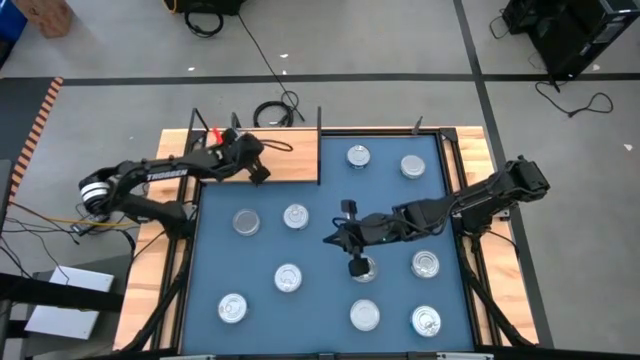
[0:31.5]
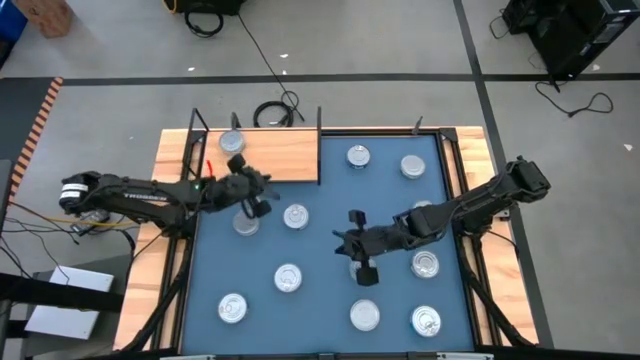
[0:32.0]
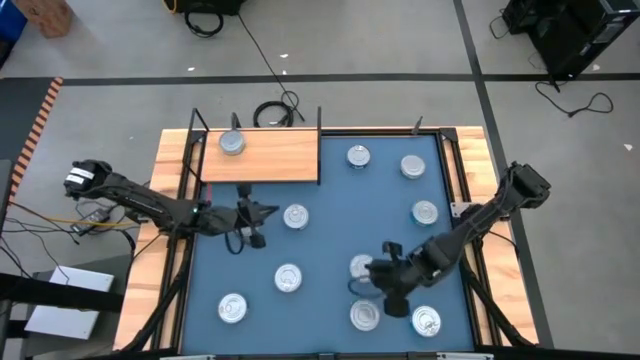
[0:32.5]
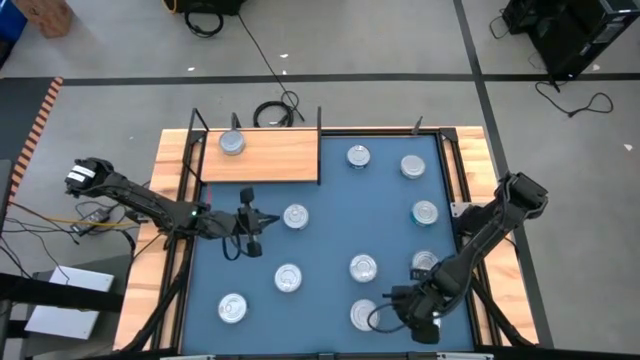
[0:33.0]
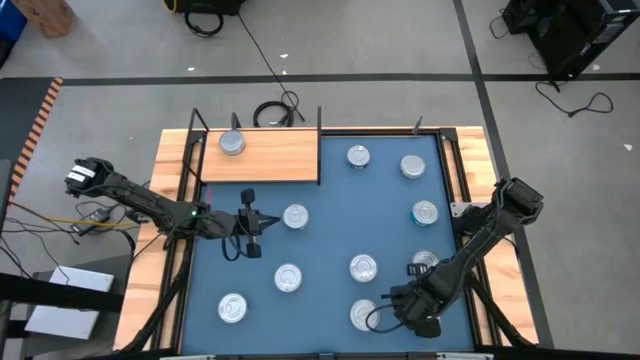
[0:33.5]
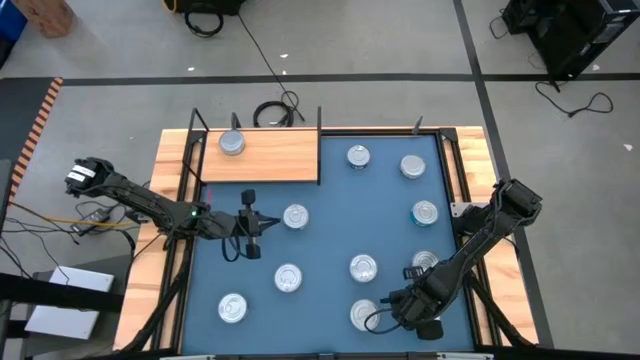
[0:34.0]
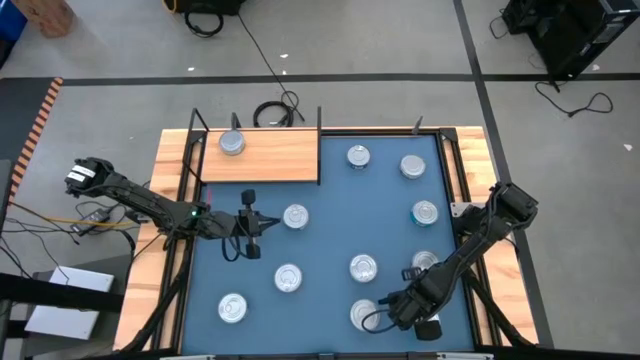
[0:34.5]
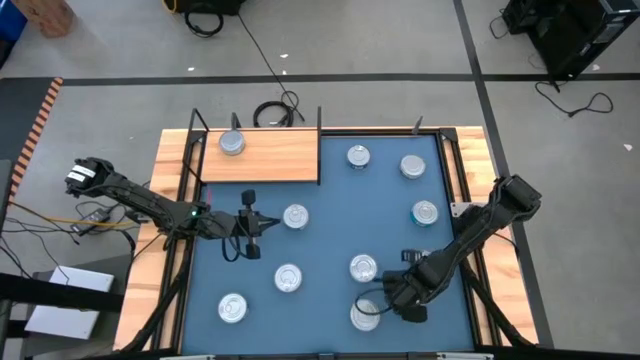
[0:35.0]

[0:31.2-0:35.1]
Task: Stack canned seafood by type on shelf
Put the yellow-blue tuna can on the shelf

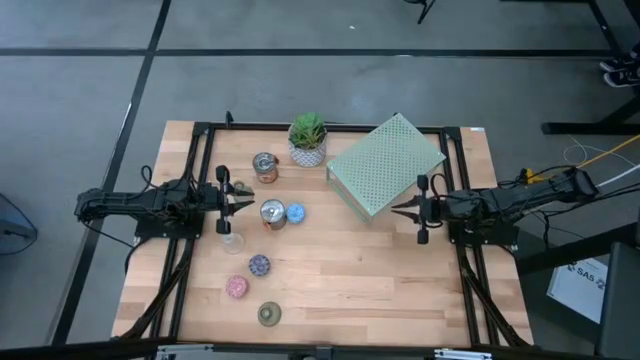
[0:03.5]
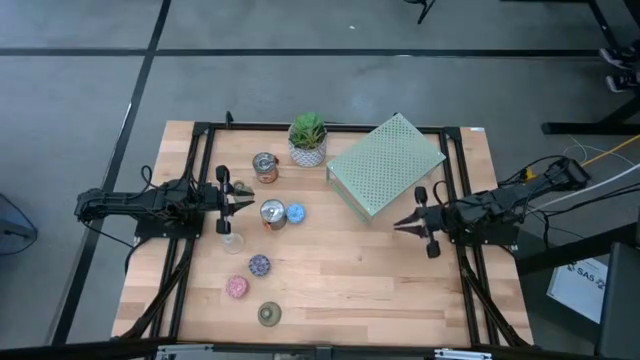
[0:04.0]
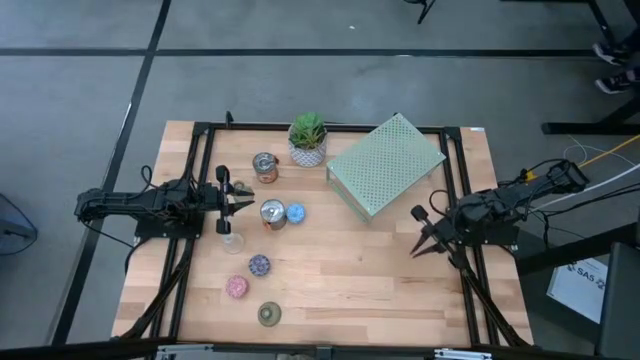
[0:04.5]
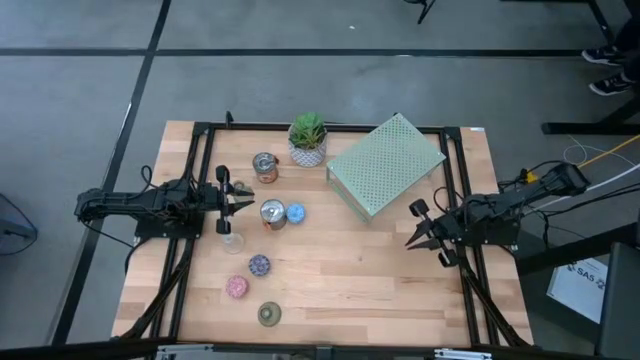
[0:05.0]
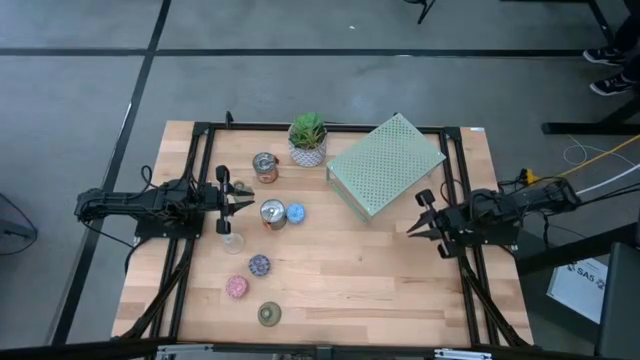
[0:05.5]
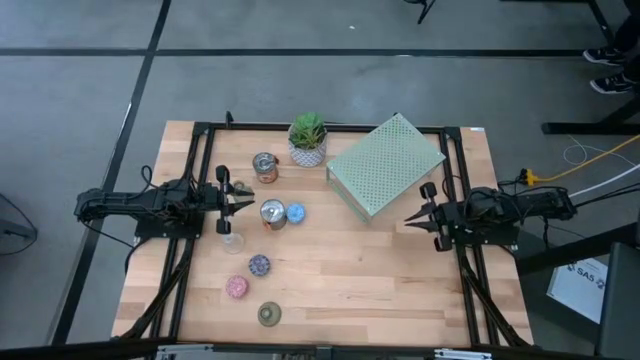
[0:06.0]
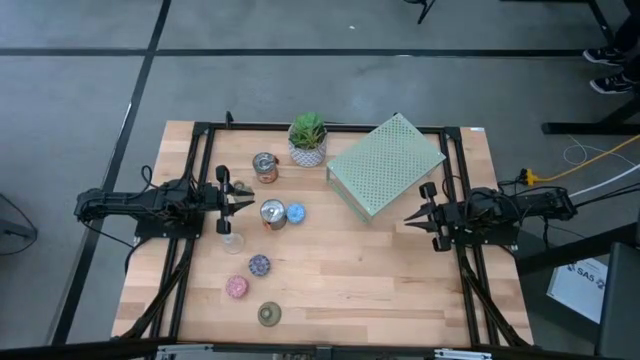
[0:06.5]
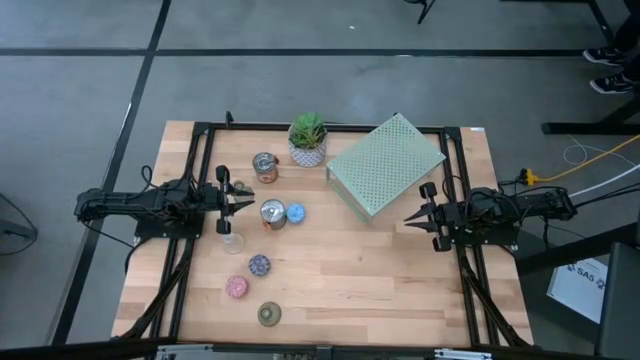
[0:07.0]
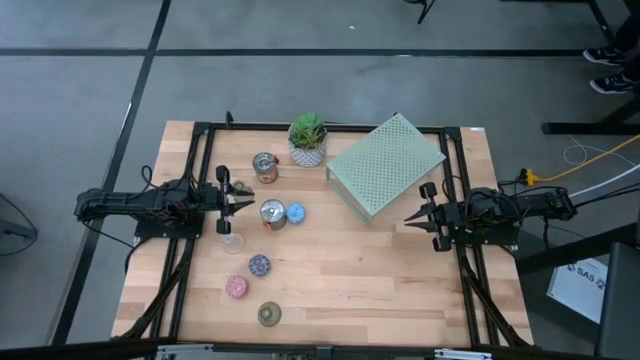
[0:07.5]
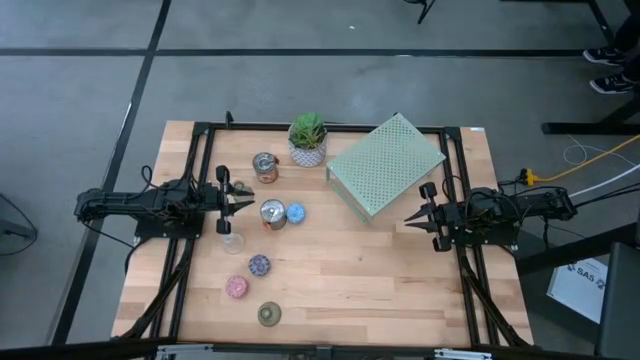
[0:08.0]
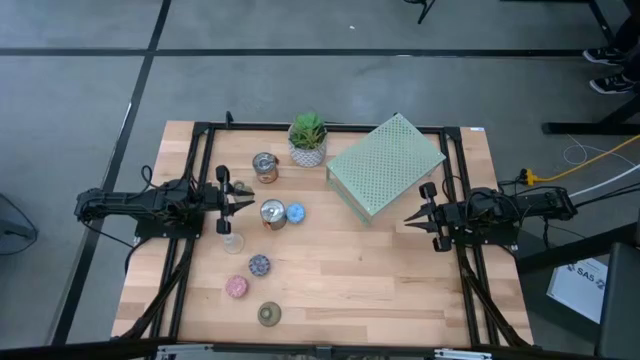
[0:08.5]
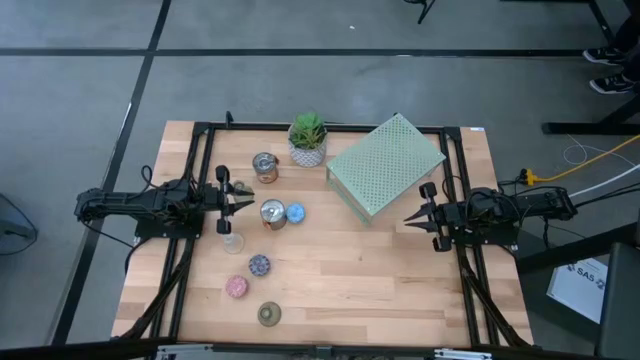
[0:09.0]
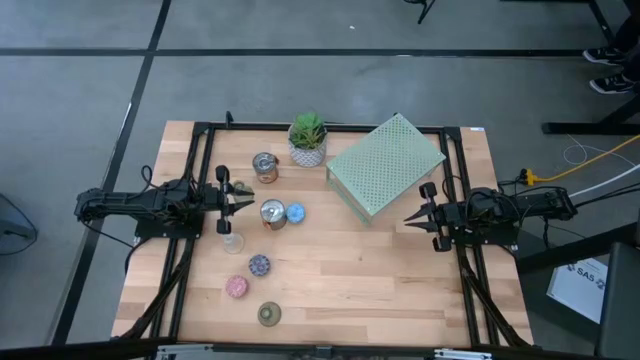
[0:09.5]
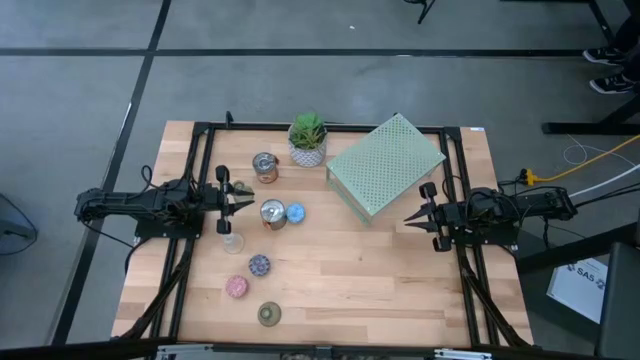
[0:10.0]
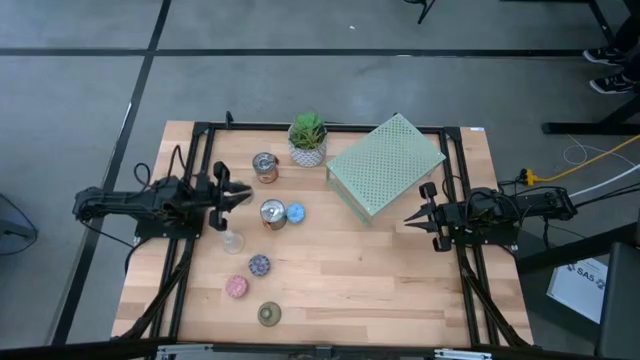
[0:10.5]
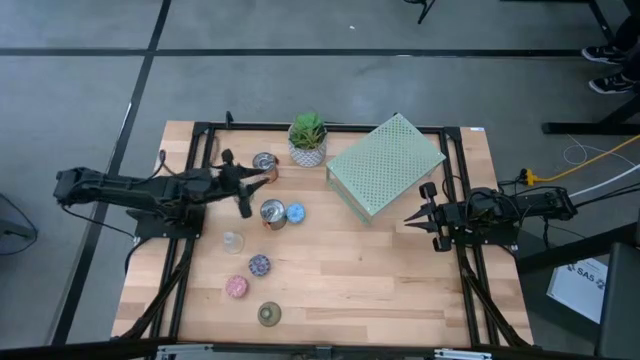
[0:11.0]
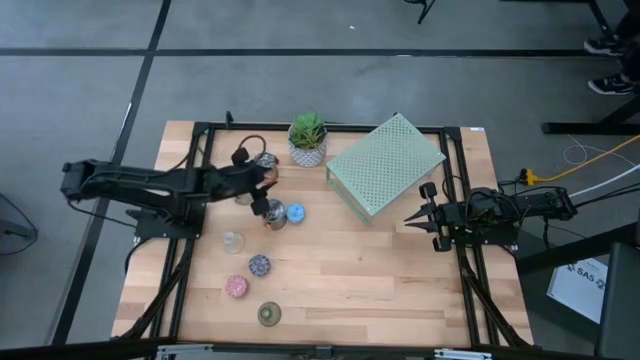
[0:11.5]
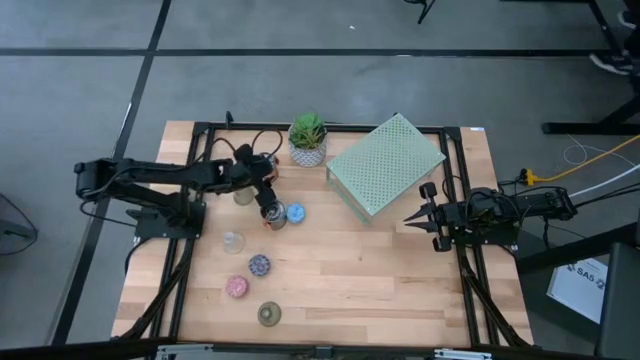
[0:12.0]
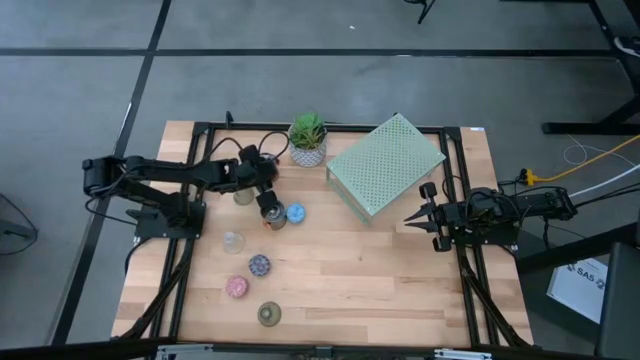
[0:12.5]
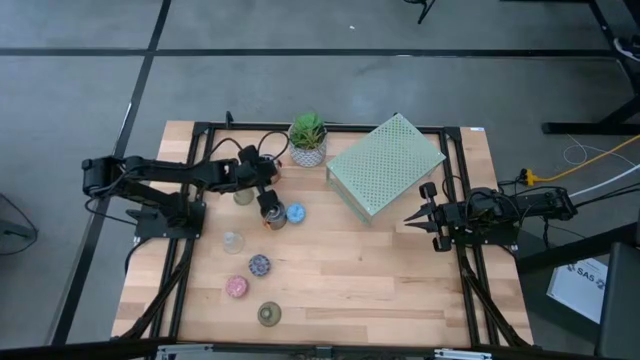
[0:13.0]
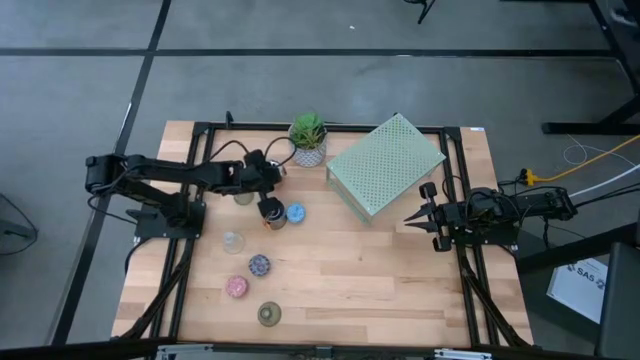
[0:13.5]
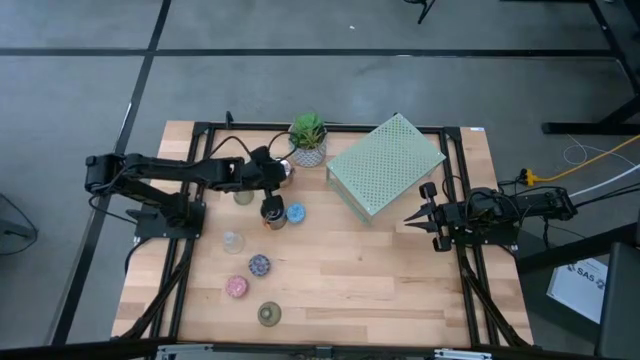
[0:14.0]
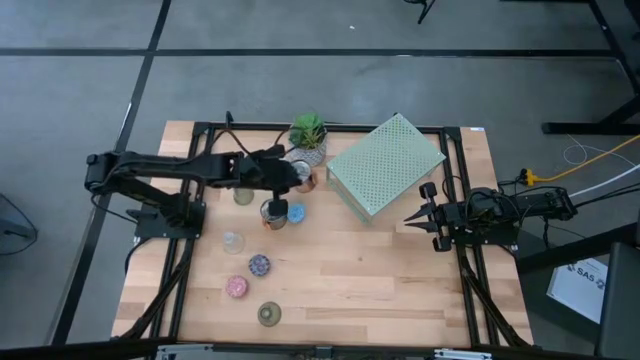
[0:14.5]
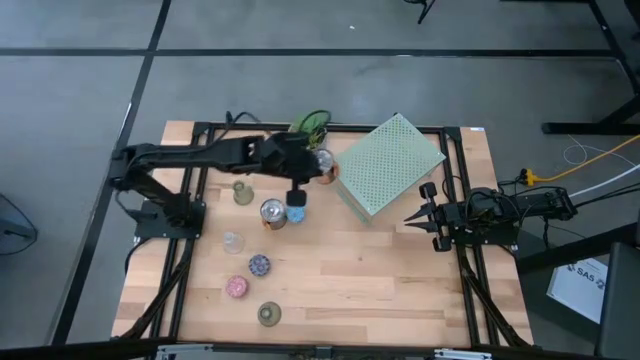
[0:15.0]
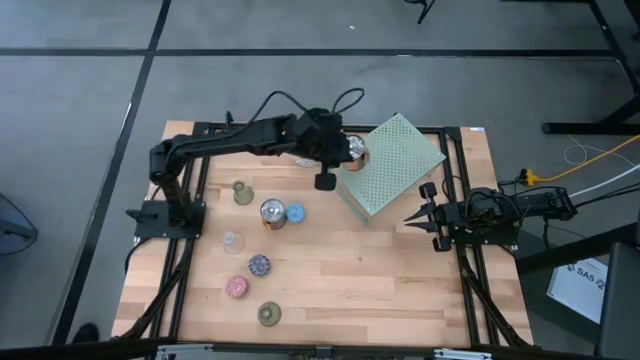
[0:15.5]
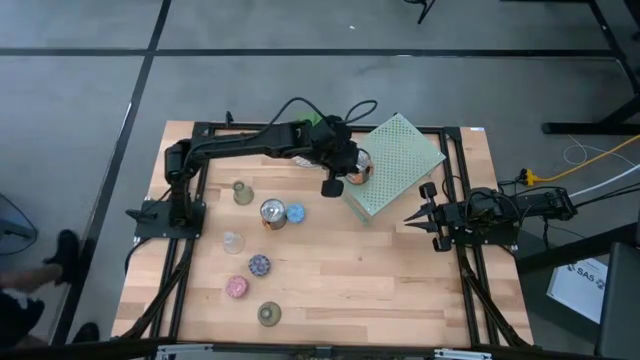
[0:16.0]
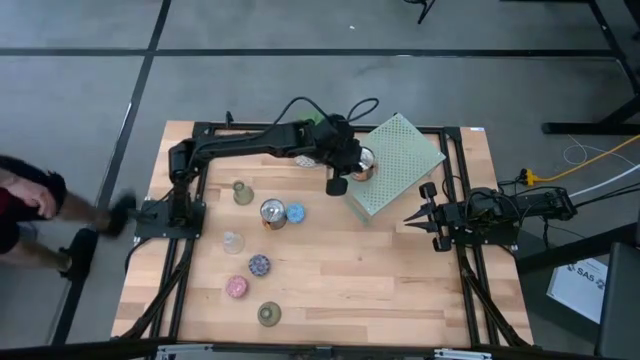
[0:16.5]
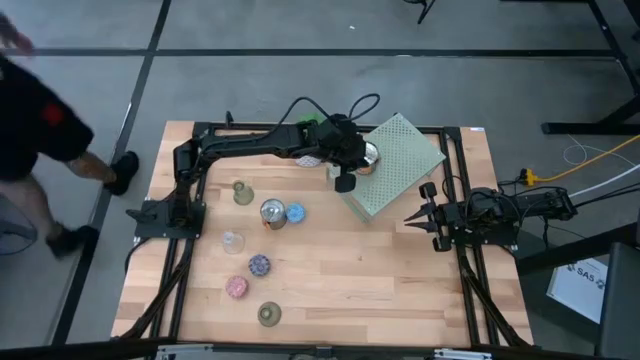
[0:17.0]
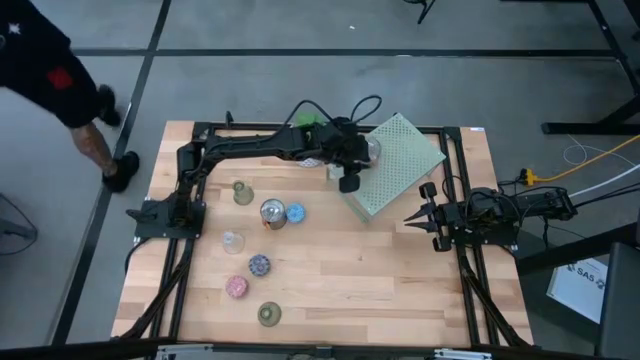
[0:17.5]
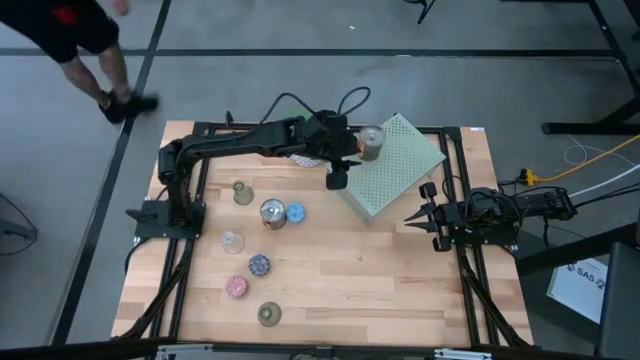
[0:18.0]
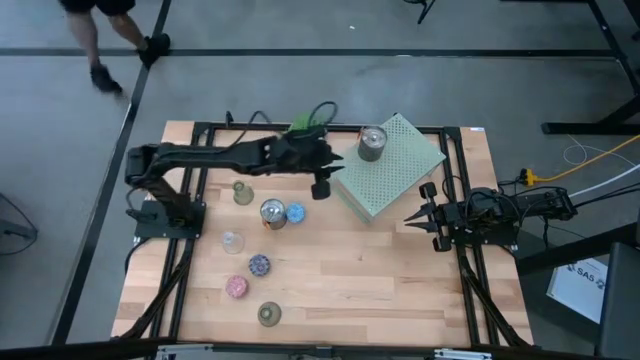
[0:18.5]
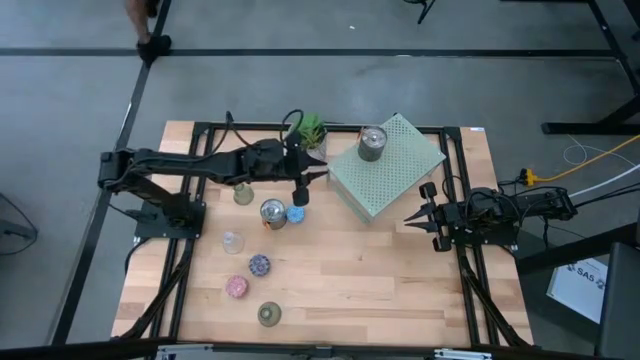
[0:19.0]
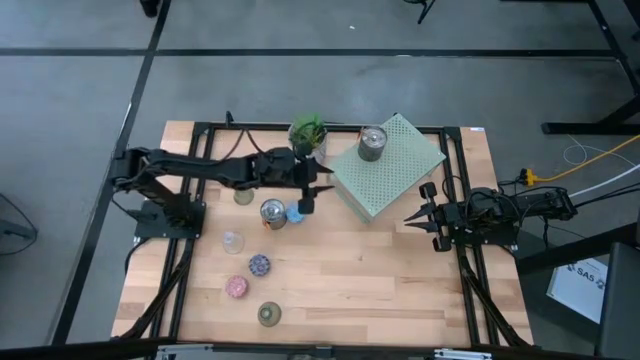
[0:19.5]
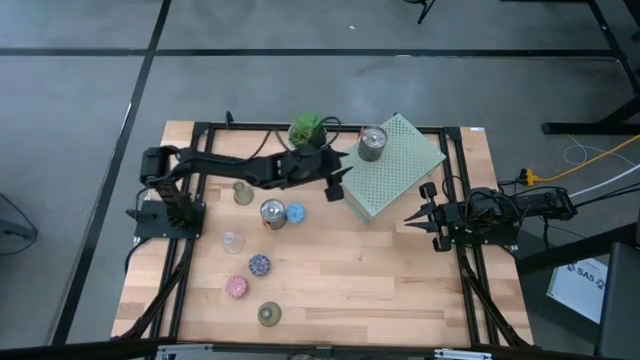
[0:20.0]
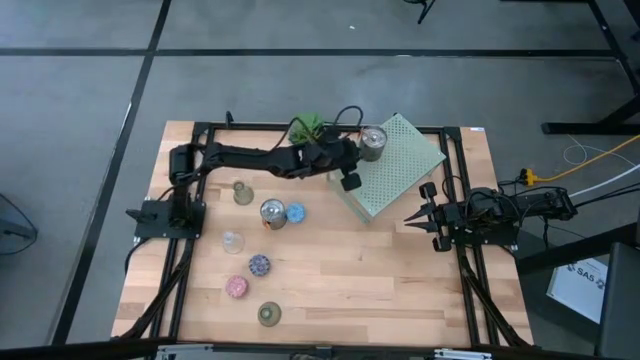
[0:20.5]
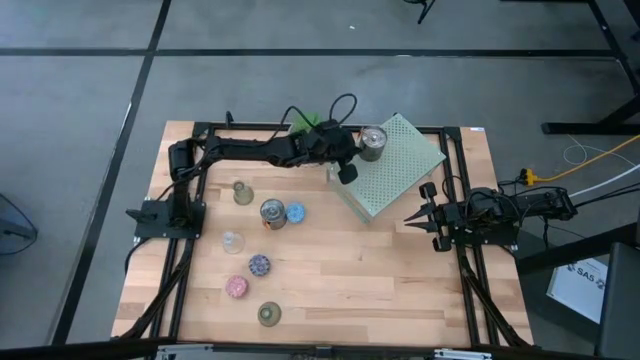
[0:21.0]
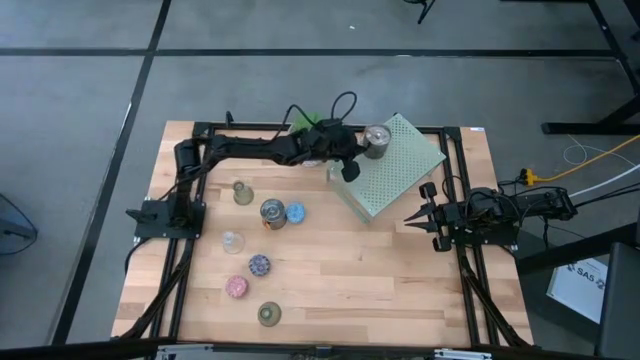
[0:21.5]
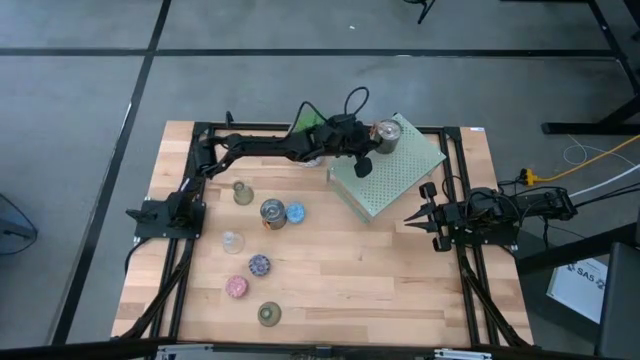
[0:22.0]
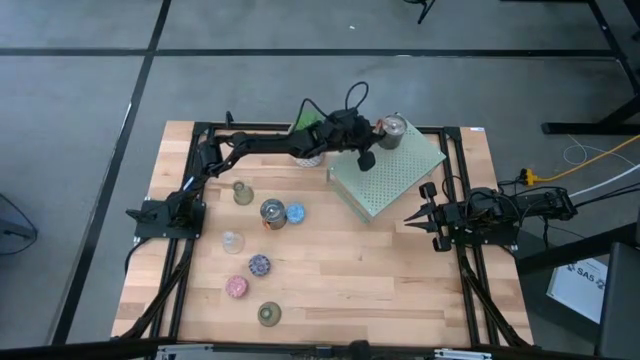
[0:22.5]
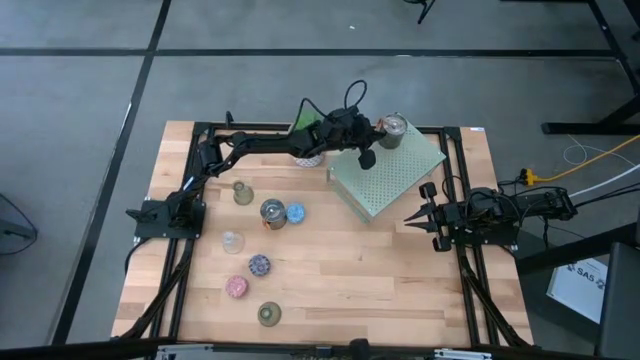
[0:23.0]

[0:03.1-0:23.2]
Task: Pick & Place candle stick holders
Put the top silver scented candle on the shelf
